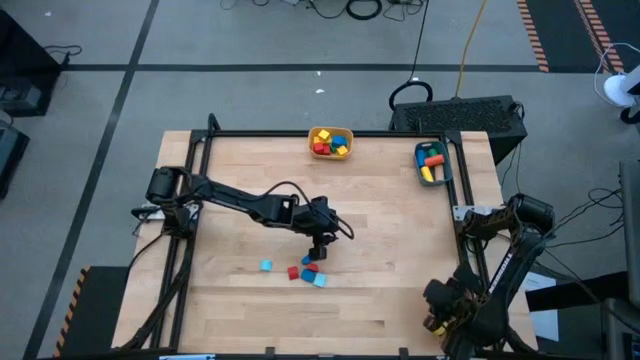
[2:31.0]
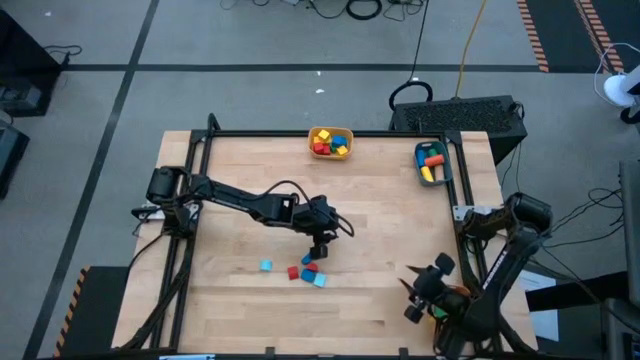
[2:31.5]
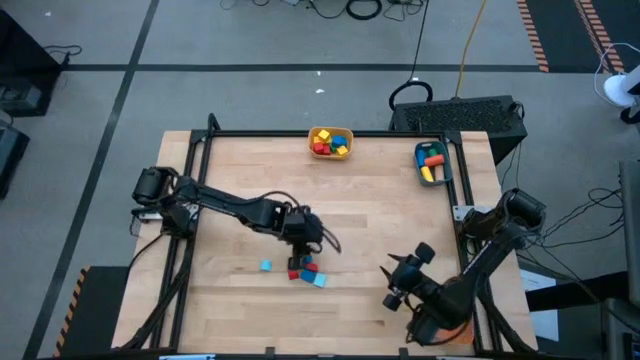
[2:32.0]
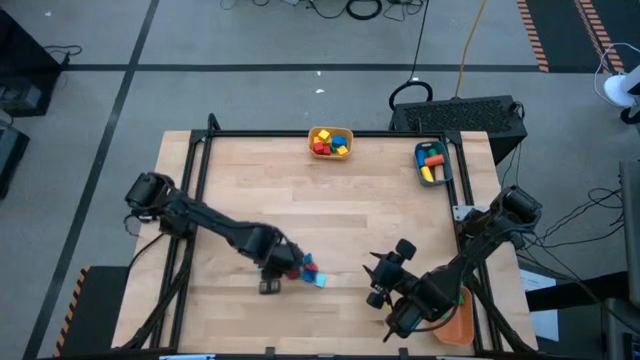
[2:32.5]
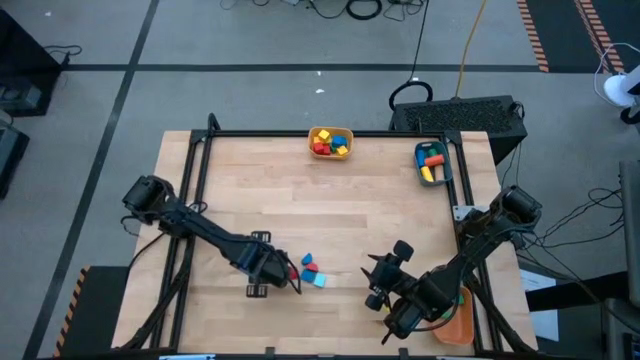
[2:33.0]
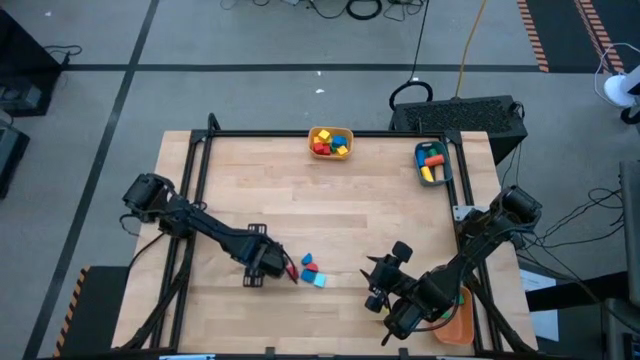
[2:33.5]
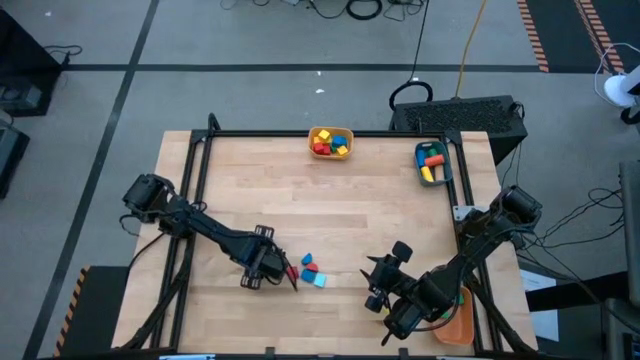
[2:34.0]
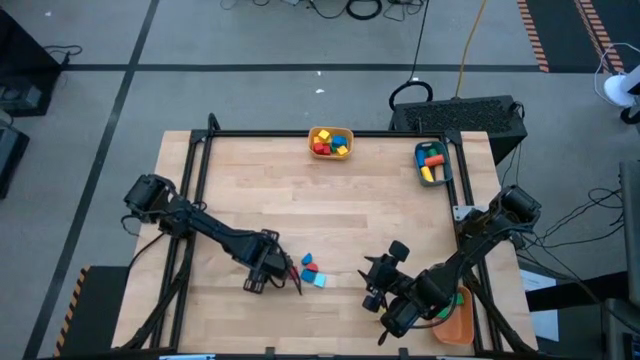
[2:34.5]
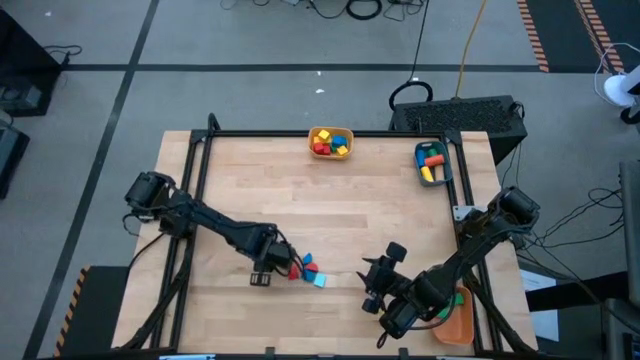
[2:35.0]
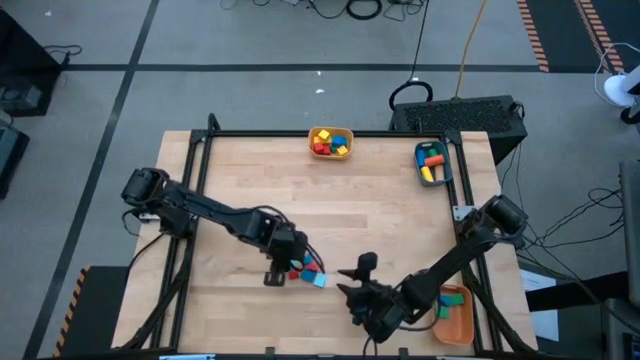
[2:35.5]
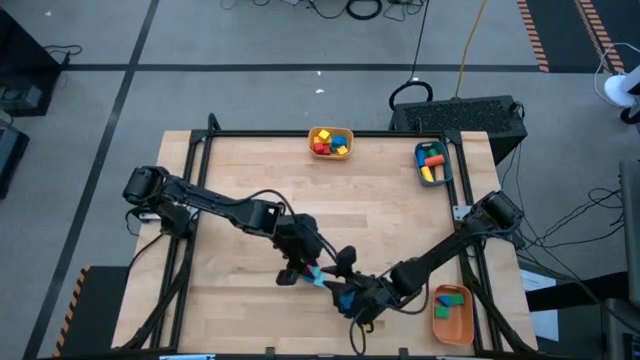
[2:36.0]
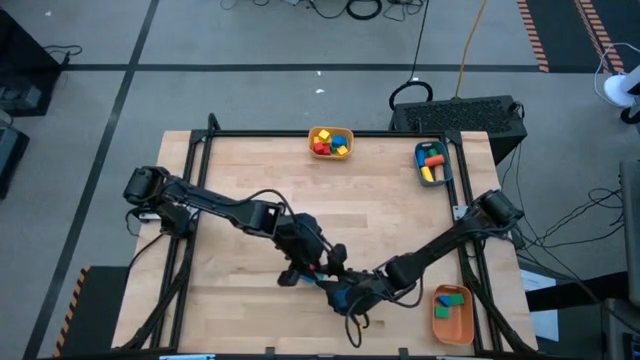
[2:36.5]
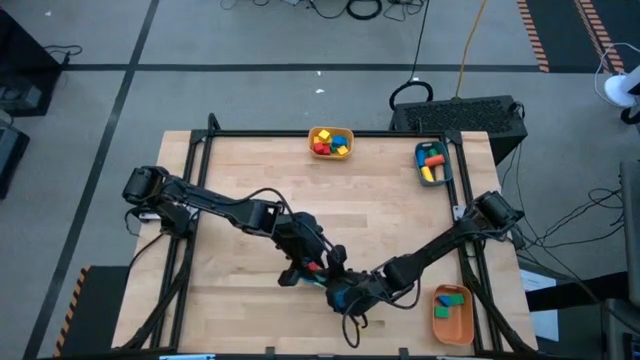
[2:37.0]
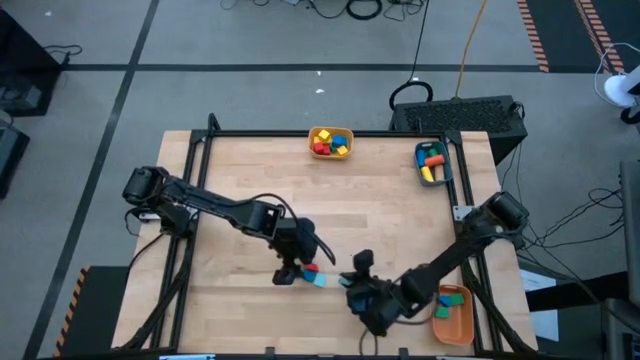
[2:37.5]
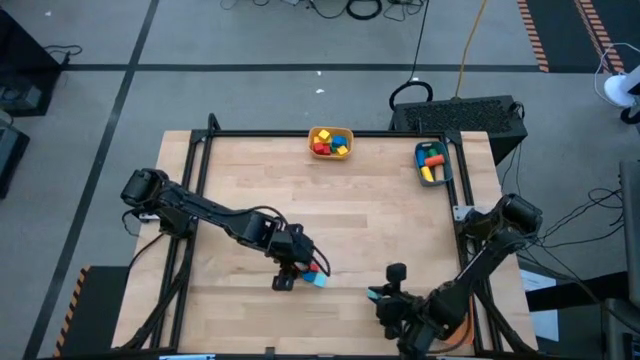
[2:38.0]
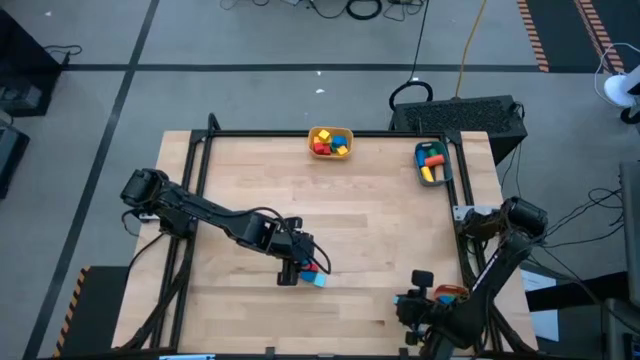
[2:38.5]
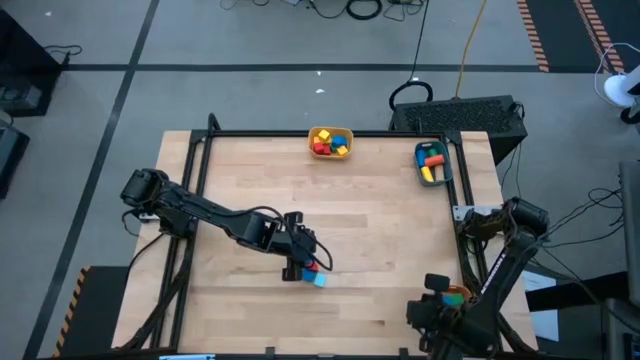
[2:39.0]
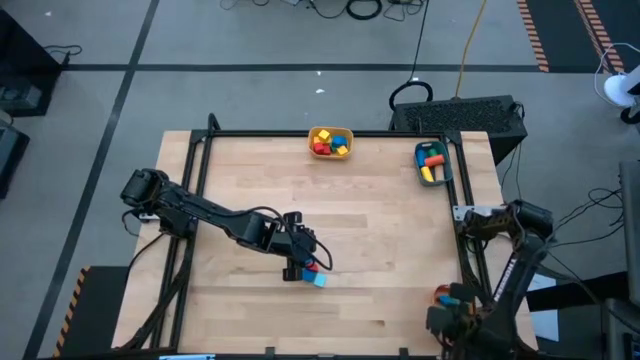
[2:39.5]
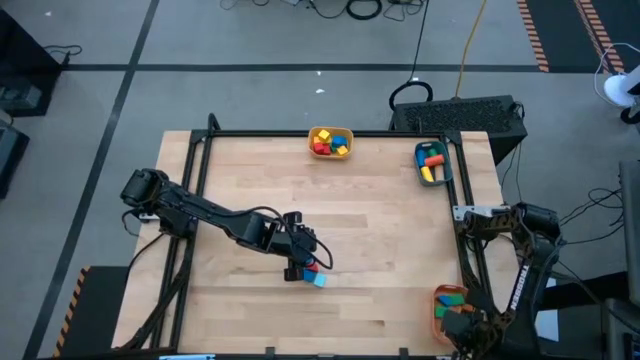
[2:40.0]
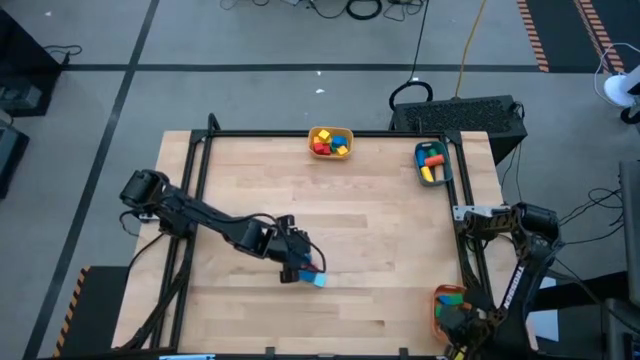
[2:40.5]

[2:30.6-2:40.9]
Task: Sort blocks by size
Put the light blue half circle block into the orange bin

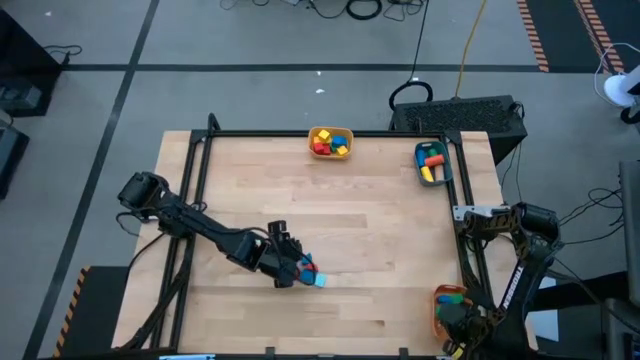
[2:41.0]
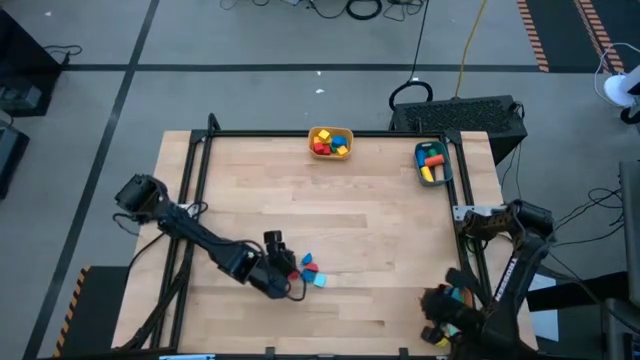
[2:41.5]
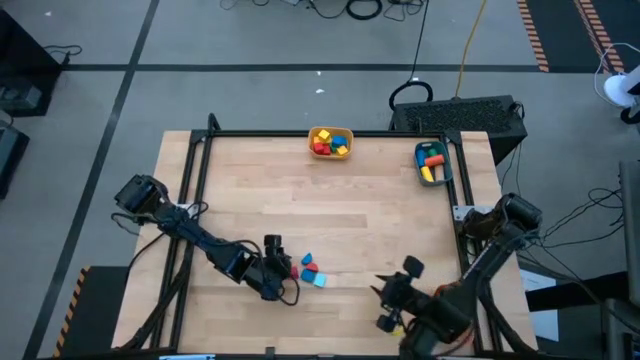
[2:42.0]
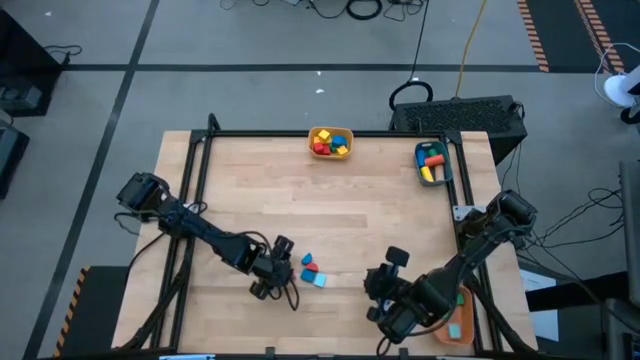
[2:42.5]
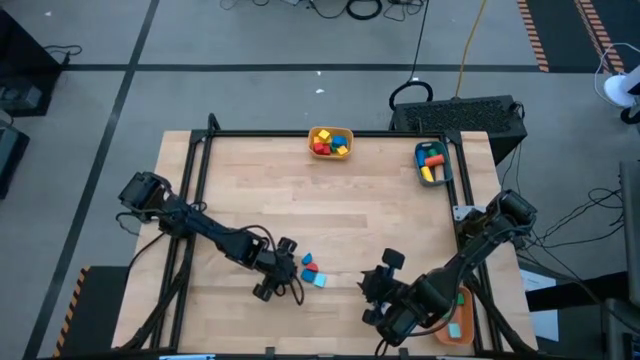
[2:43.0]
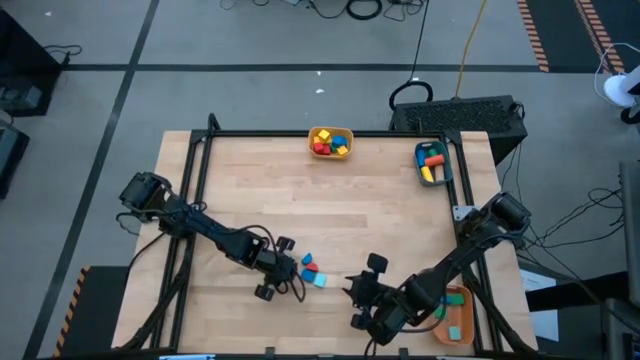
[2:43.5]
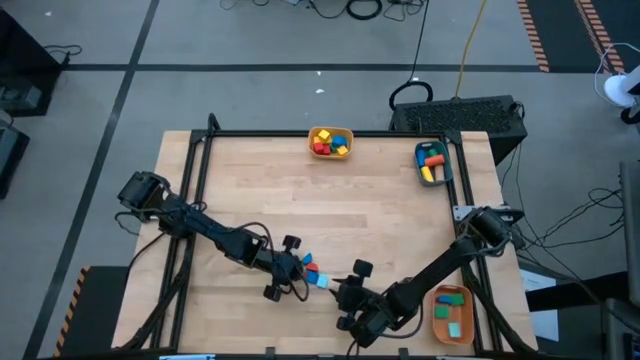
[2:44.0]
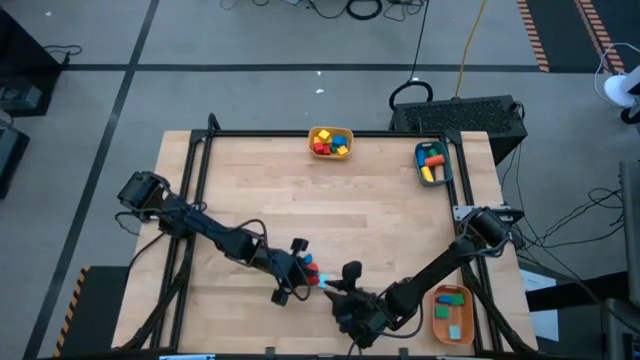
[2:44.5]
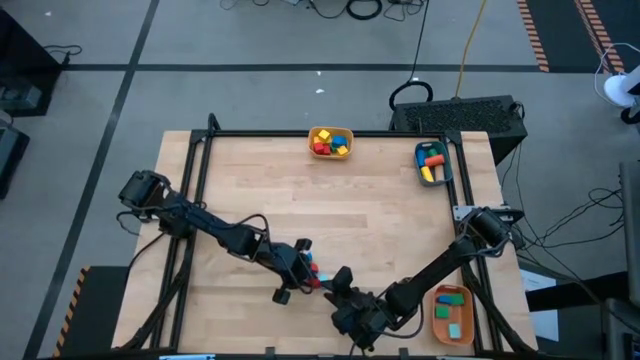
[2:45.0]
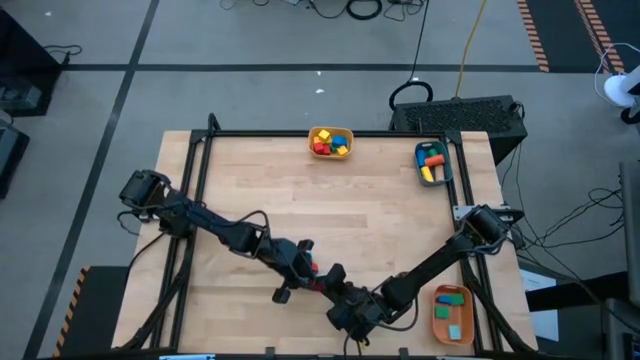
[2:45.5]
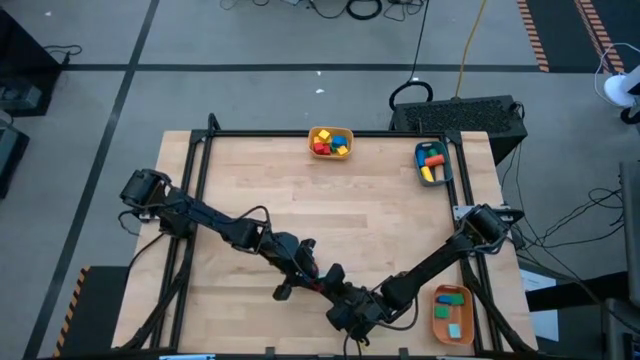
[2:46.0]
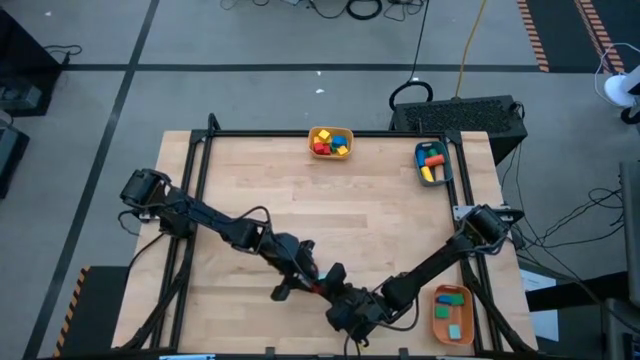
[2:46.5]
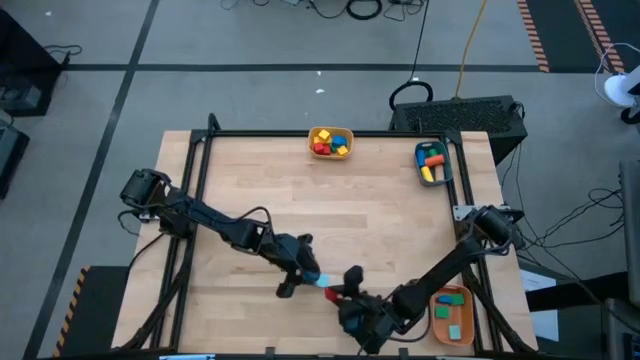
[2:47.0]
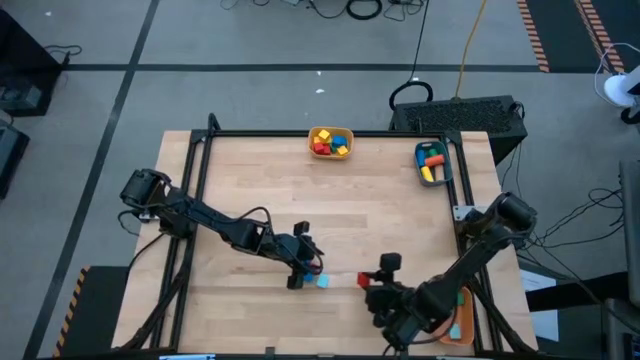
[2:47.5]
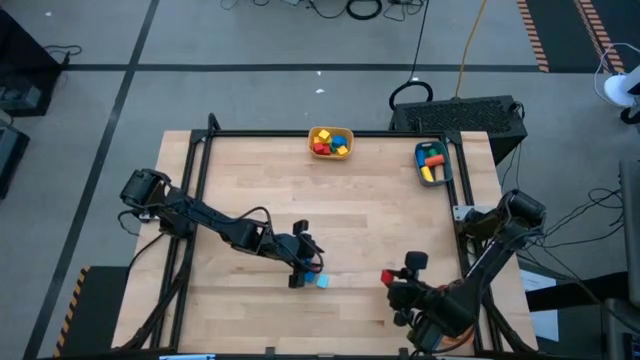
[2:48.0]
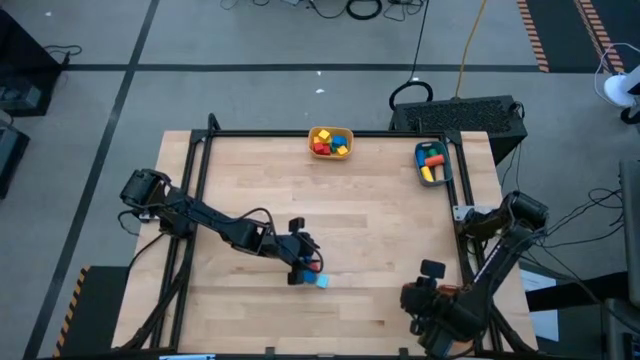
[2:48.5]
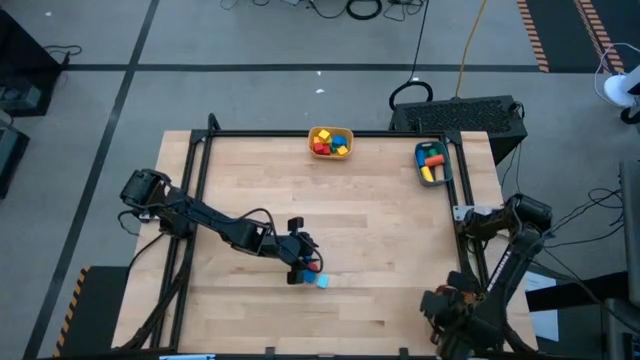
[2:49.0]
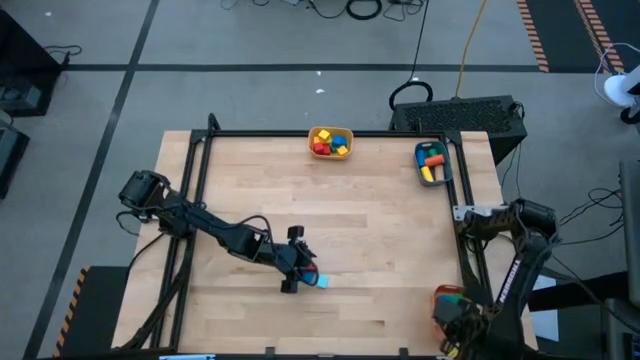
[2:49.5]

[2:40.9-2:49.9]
Put the red half circle block into the orange bin
